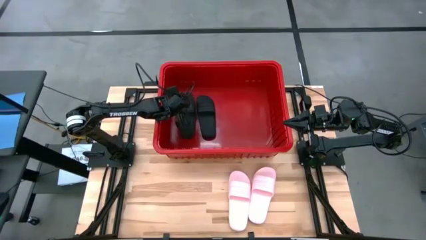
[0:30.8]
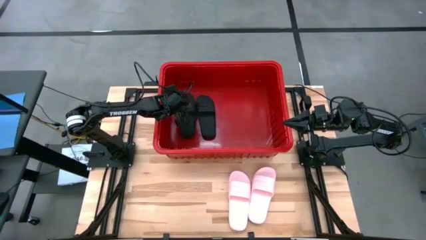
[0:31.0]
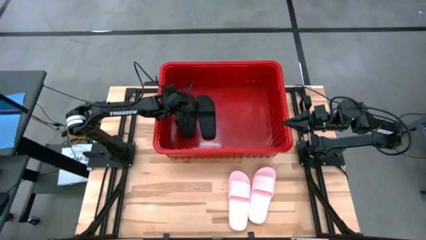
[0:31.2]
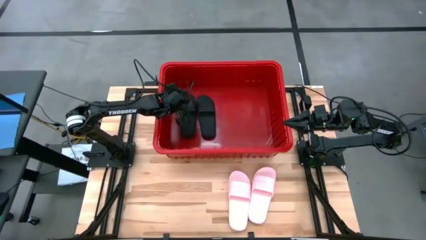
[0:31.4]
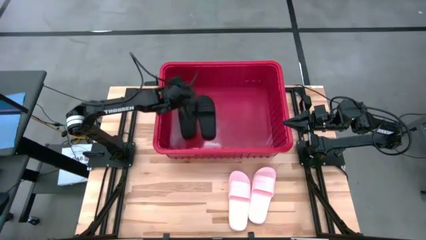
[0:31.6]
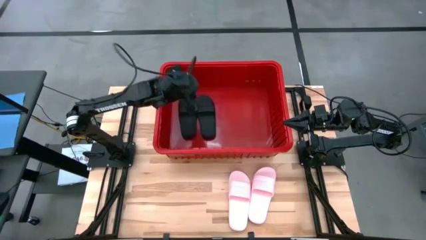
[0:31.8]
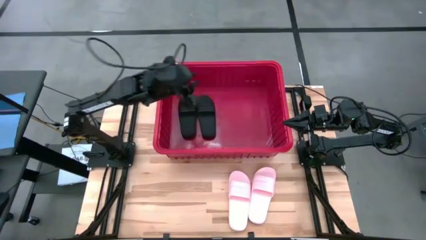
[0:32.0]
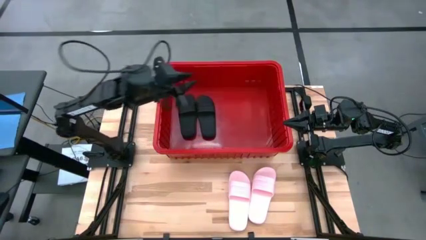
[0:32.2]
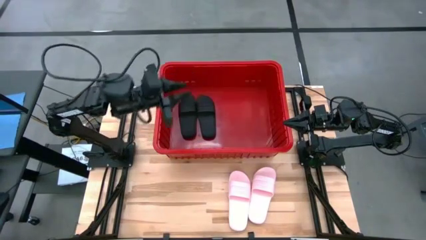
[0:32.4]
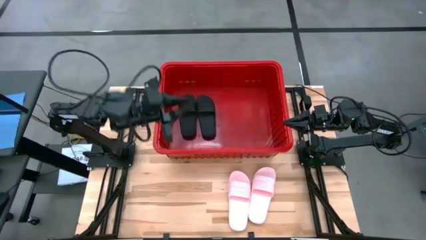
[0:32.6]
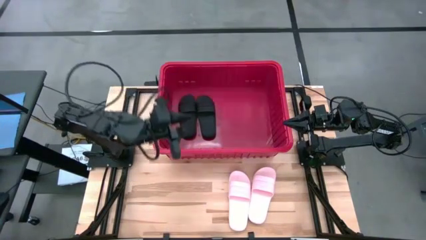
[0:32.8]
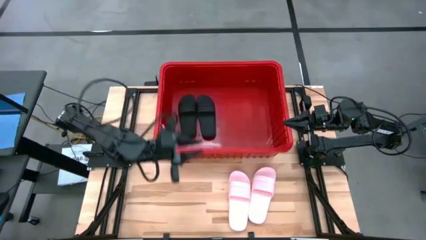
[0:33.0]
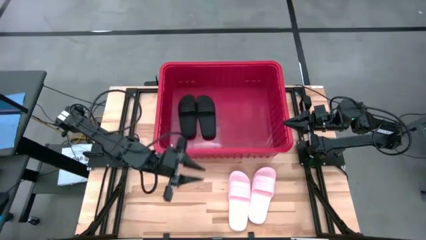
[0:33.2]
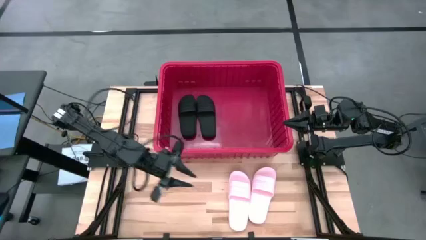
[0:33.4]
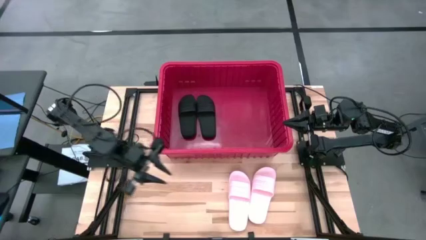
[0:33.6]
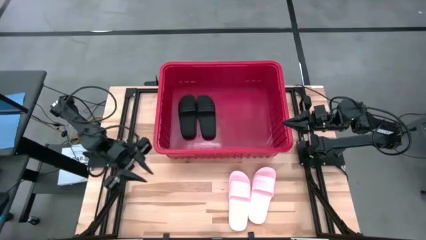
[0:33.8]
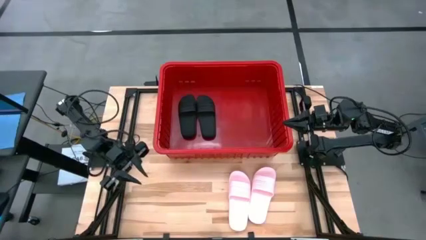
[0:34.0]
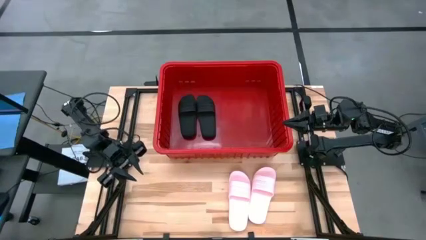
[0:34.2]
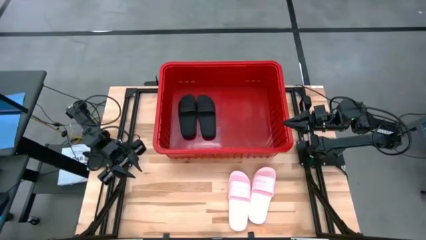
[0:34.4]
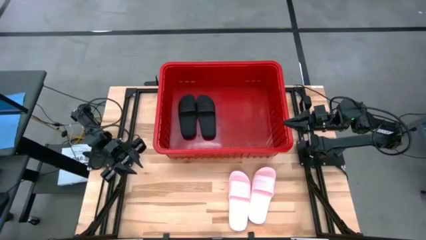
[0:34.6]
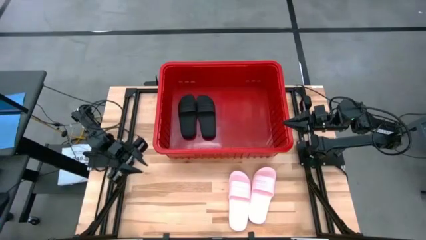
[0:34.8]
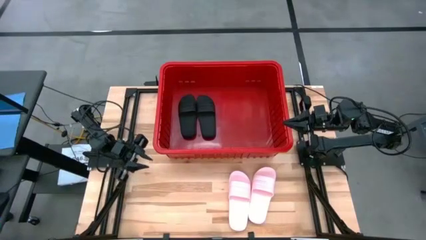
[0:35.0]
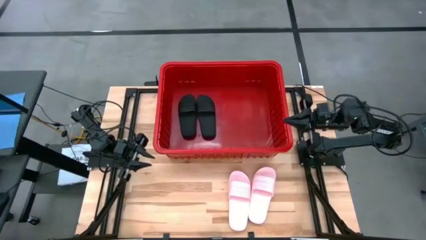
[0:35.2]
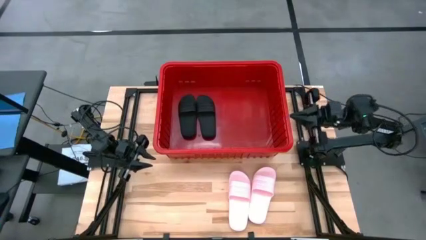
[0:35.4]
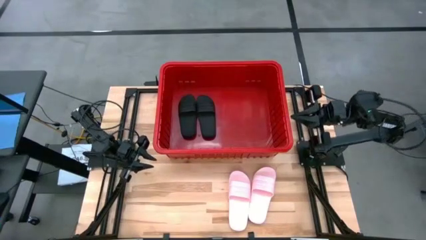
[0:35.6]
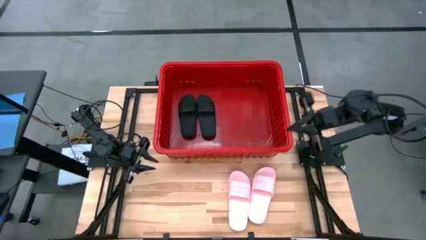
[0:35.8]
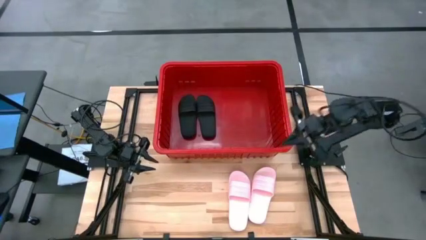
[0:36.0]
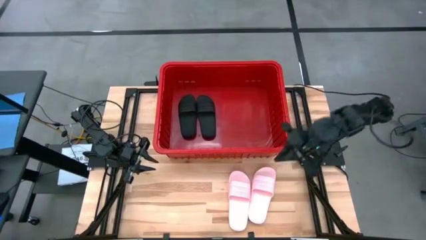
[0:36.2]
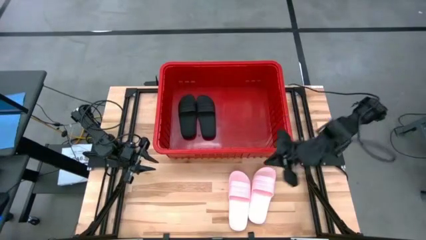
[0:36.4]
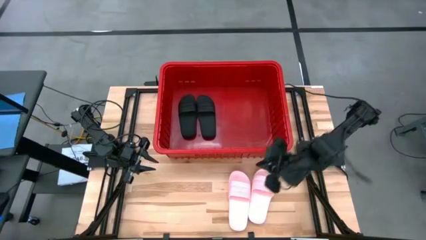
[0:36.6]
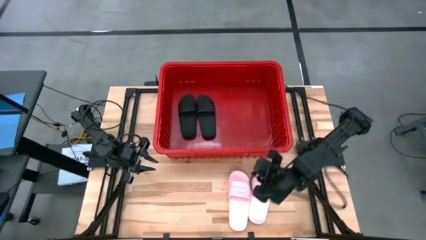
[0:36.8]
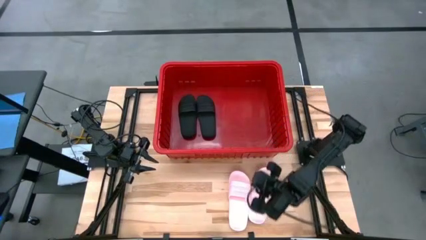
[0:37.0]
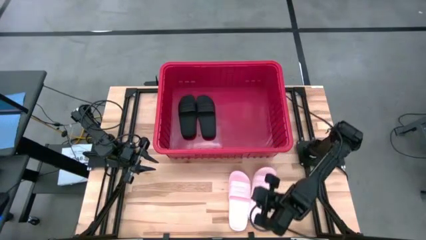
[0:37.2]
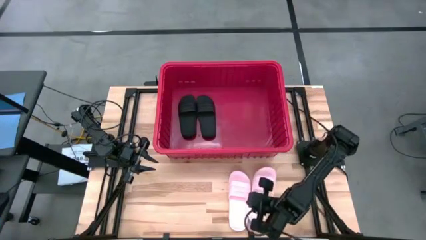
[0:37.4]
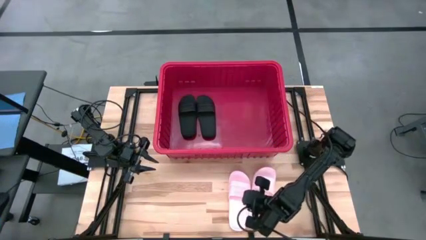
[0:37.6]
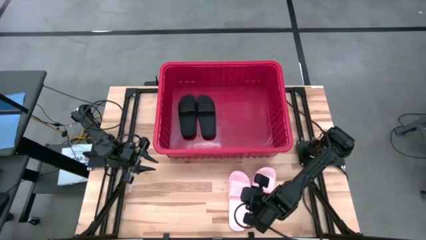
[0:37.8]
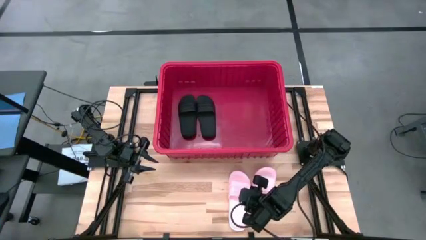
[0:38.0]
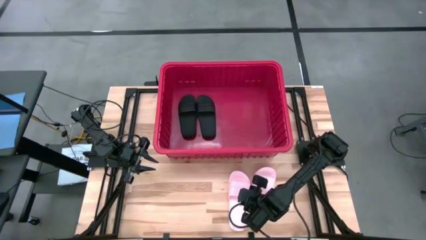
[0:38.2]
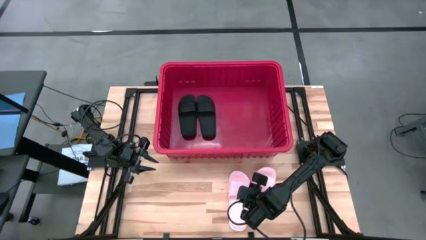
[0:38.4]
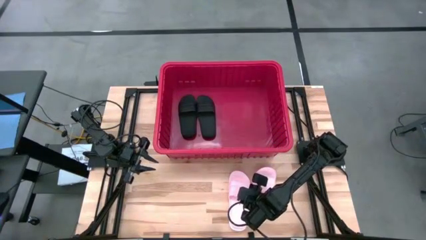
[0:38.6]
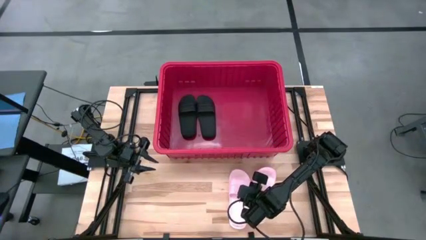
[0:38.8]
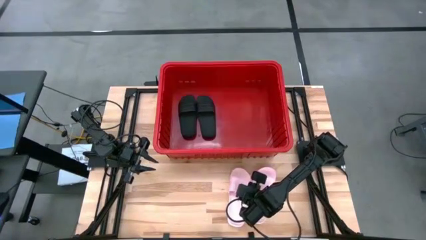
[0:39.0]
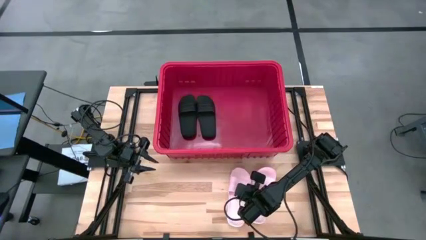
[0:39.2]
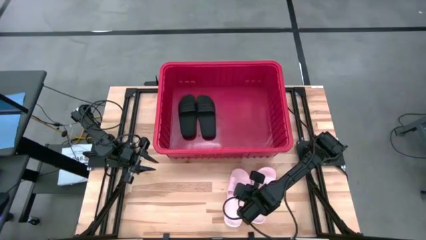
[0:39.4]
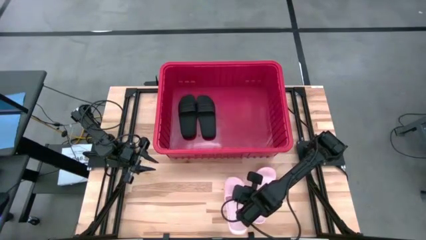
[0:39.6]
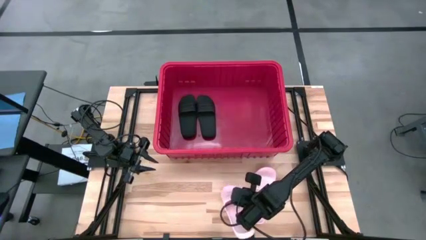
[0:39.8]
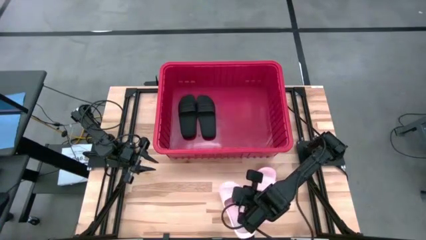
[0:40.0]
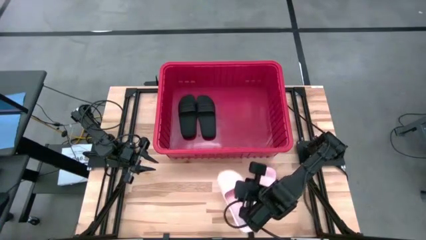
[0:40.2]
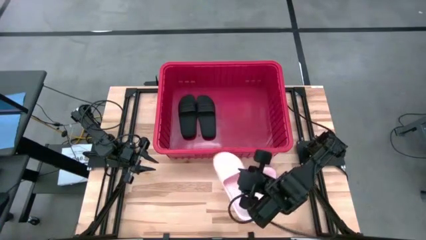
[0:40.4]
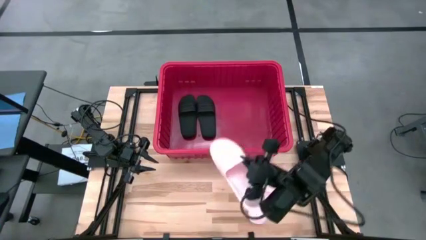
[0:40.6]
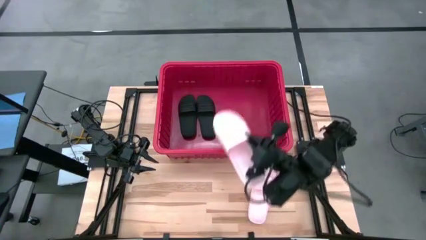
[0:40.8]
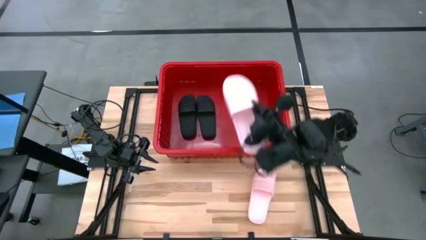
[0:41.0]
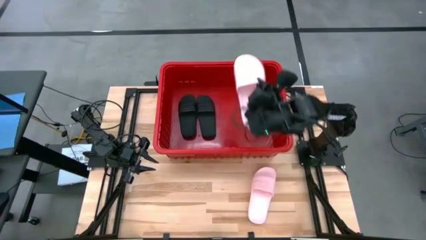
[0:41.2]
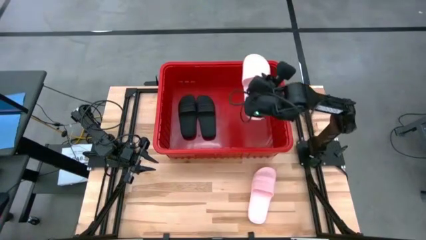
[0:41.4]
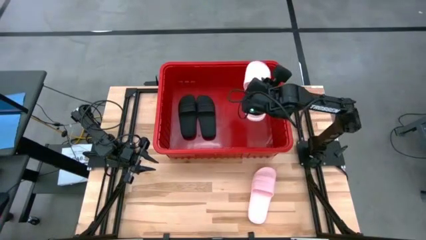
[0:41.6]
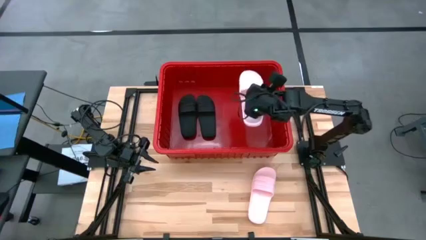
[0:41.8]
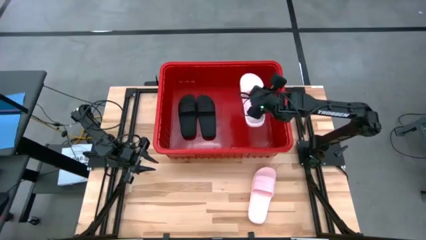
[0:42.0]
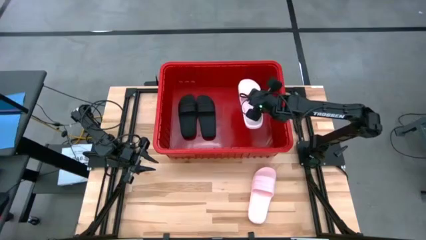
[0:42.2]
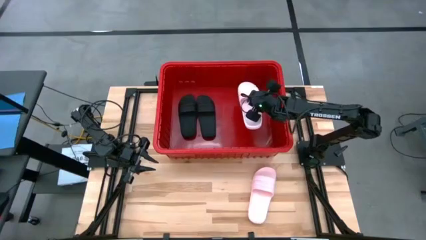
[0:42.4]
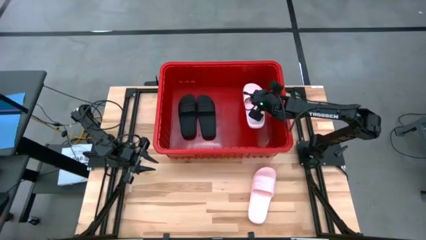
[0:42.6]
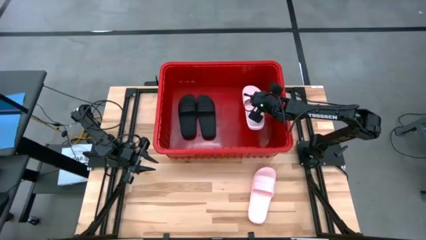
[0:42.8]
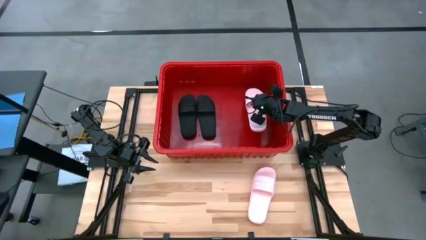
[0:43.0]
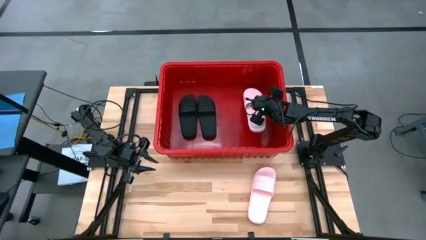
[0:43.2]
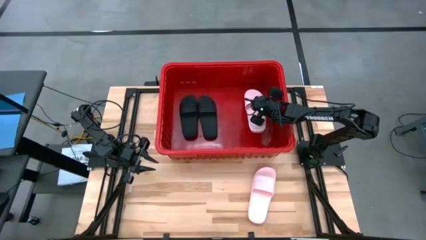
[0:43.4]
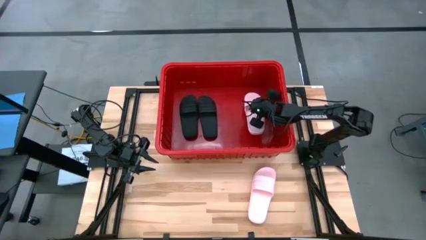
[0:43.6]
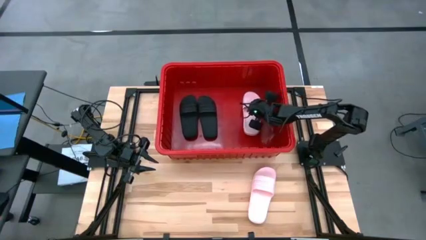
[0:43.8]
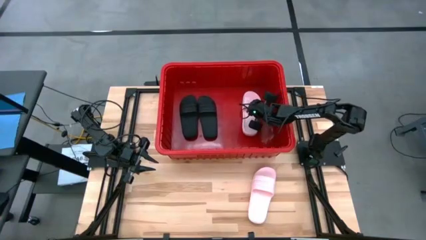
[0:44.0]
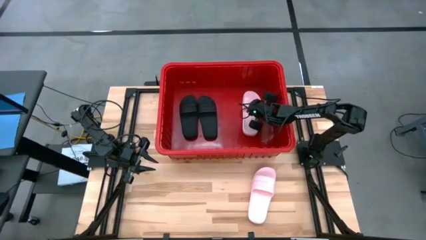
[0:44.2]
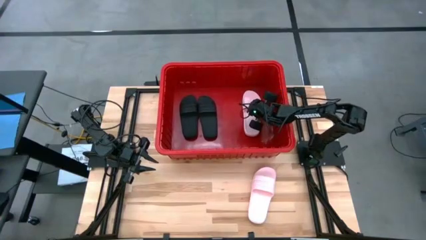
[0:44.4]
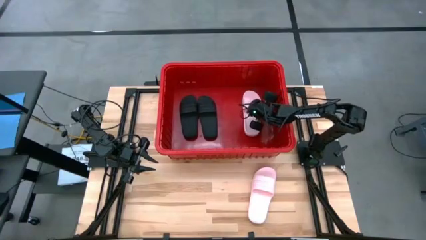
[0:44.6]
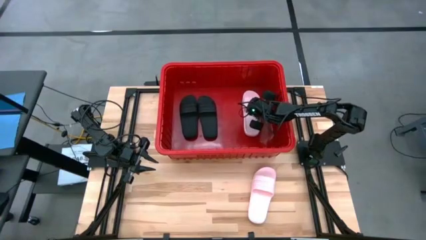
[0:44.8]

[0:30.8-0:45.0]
Task: Pick and place slides into bin
Put the left pink slipper into the red bin
